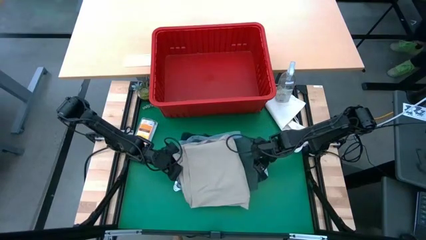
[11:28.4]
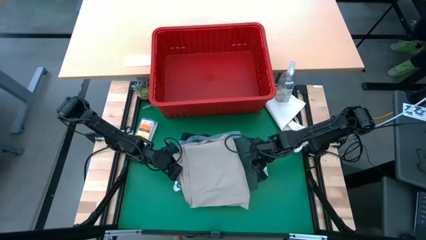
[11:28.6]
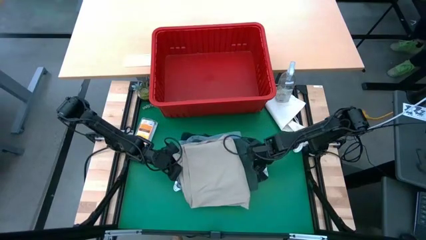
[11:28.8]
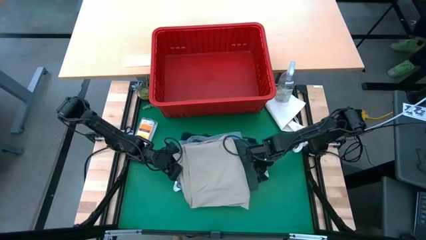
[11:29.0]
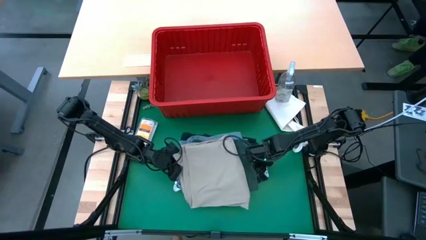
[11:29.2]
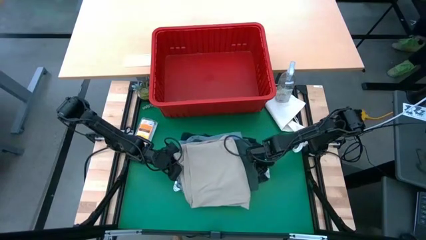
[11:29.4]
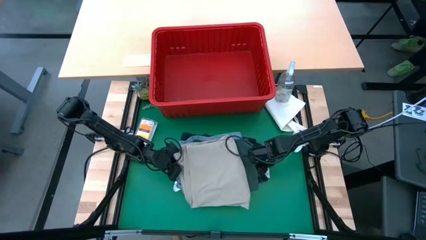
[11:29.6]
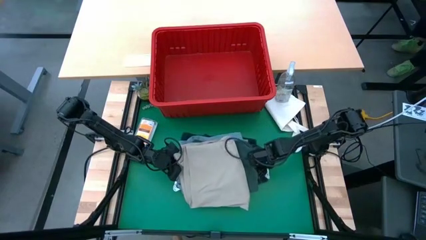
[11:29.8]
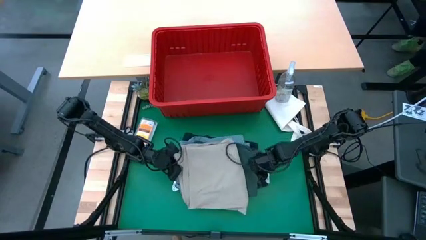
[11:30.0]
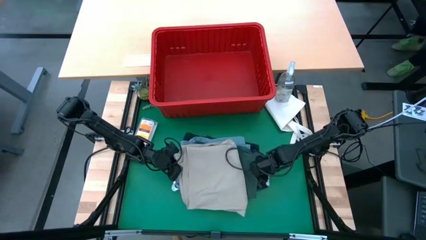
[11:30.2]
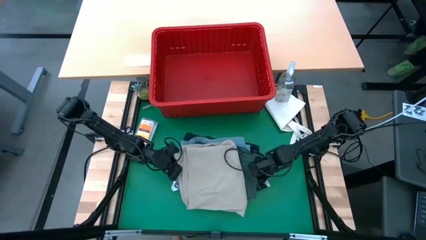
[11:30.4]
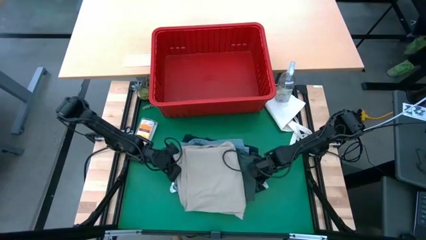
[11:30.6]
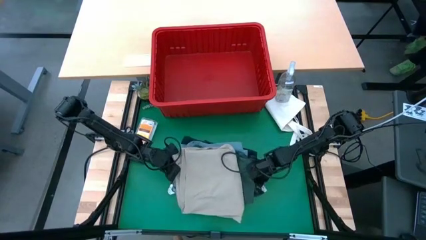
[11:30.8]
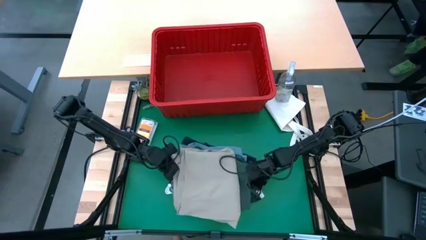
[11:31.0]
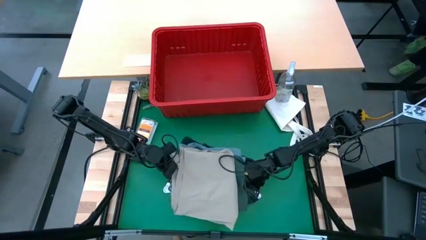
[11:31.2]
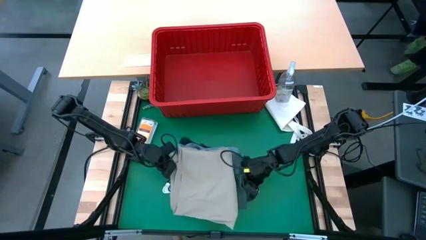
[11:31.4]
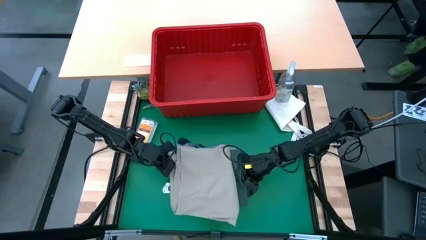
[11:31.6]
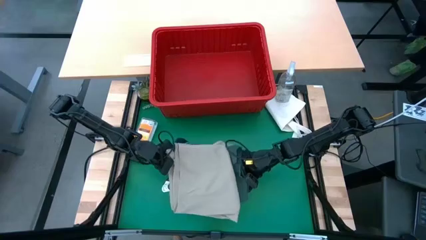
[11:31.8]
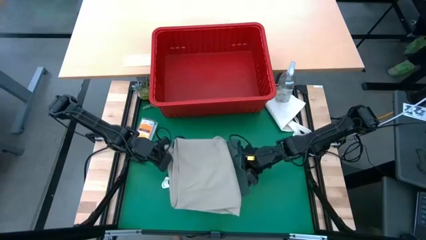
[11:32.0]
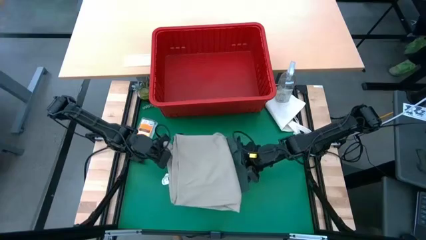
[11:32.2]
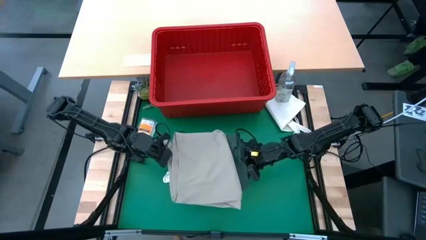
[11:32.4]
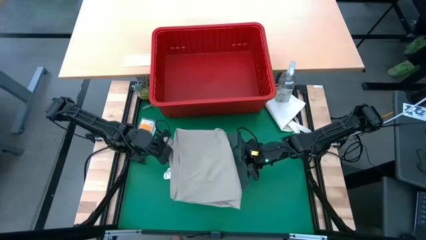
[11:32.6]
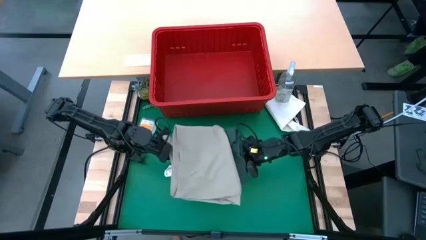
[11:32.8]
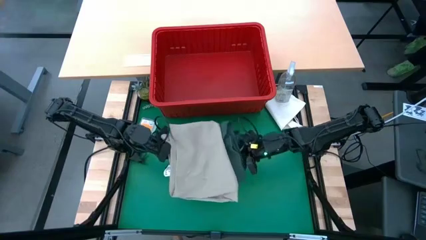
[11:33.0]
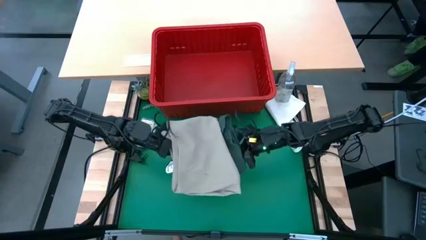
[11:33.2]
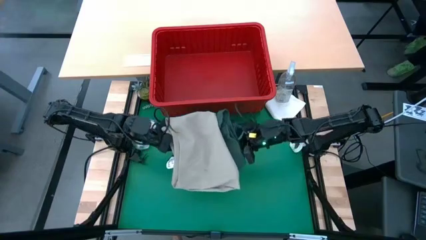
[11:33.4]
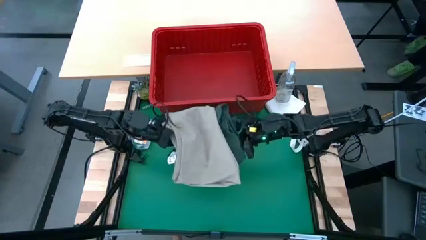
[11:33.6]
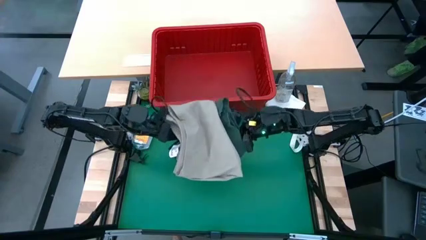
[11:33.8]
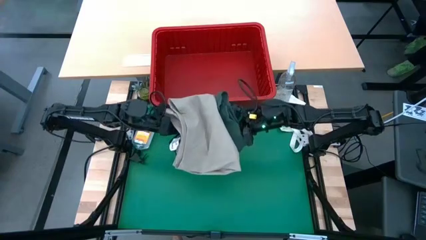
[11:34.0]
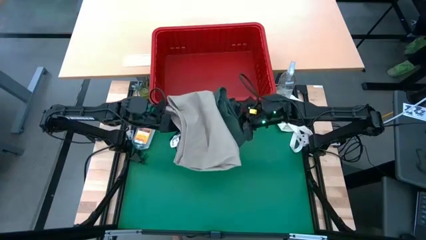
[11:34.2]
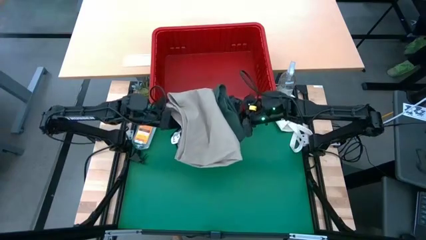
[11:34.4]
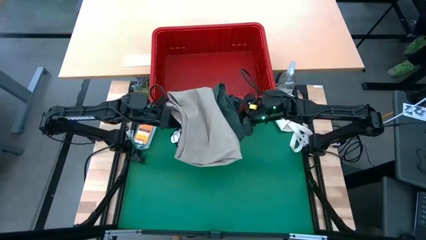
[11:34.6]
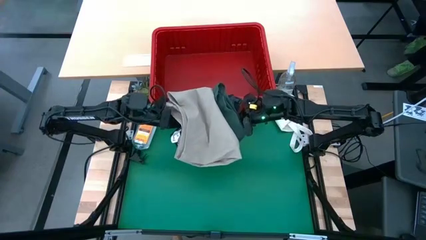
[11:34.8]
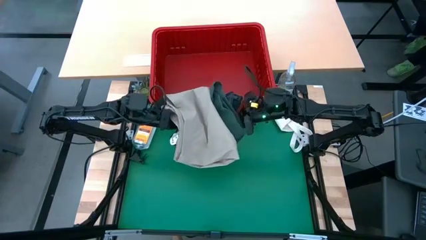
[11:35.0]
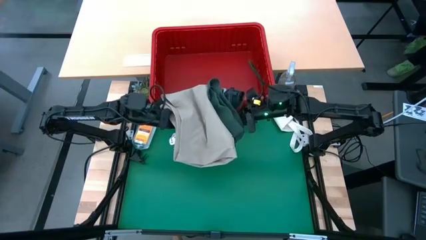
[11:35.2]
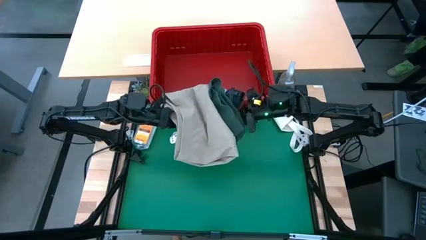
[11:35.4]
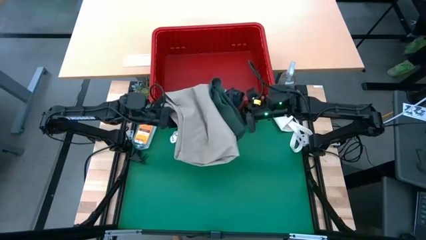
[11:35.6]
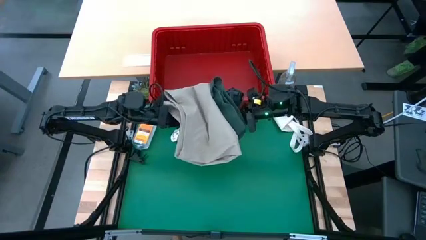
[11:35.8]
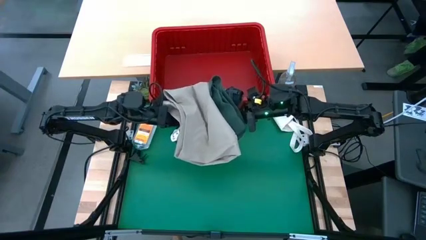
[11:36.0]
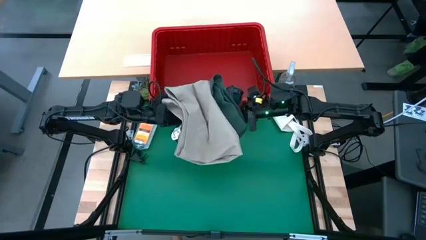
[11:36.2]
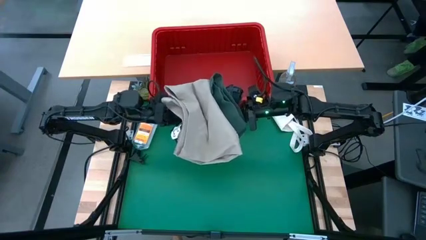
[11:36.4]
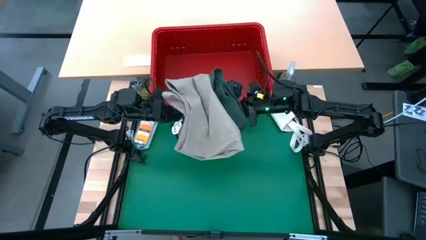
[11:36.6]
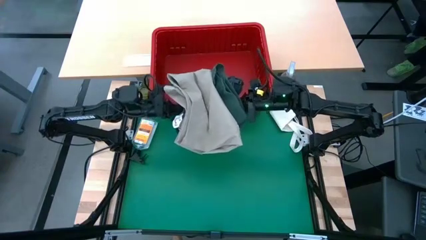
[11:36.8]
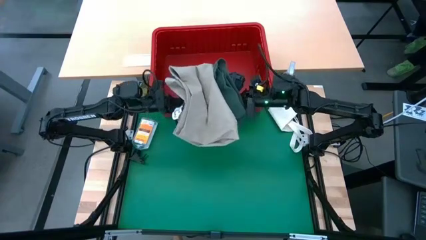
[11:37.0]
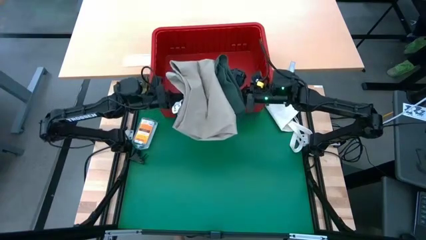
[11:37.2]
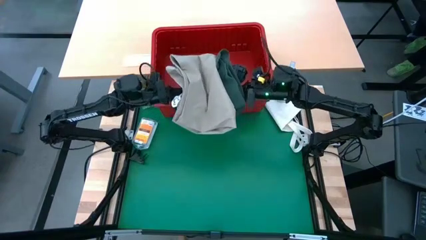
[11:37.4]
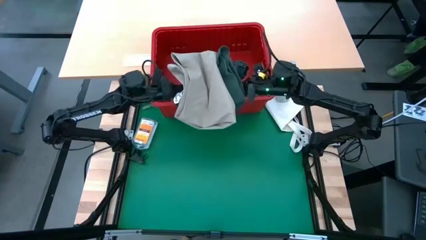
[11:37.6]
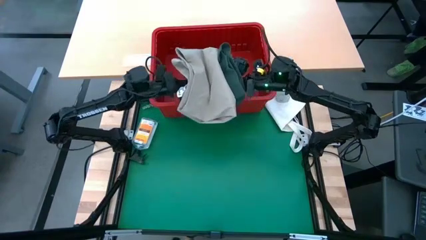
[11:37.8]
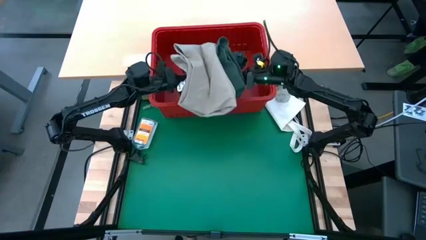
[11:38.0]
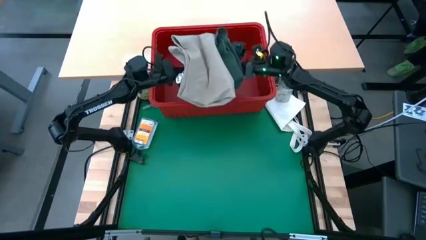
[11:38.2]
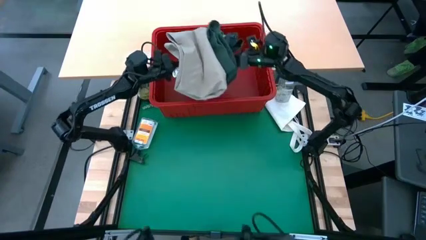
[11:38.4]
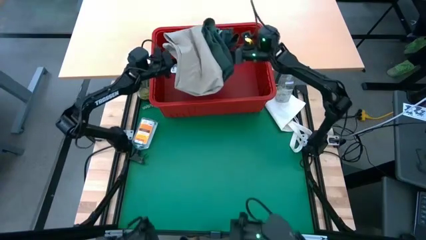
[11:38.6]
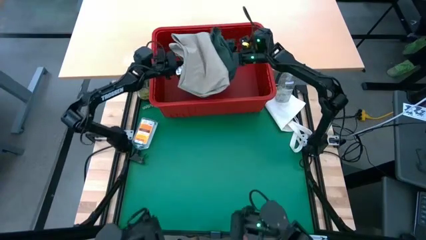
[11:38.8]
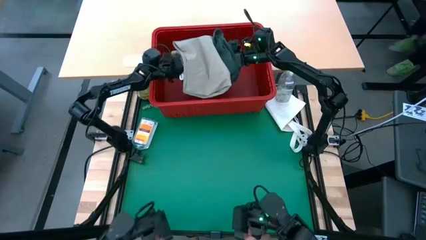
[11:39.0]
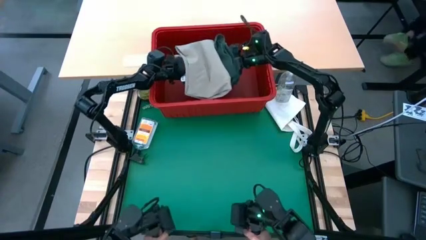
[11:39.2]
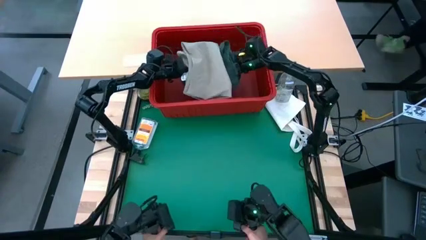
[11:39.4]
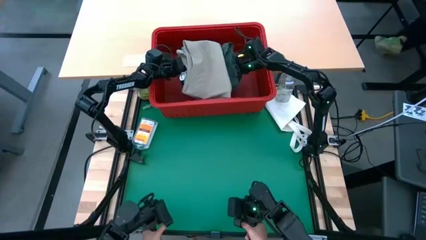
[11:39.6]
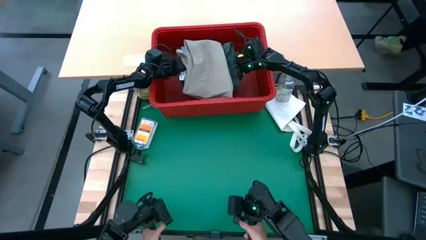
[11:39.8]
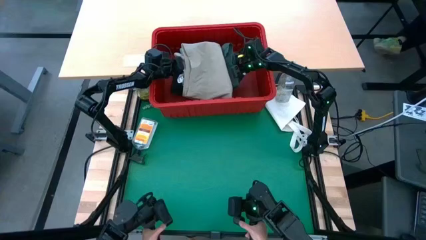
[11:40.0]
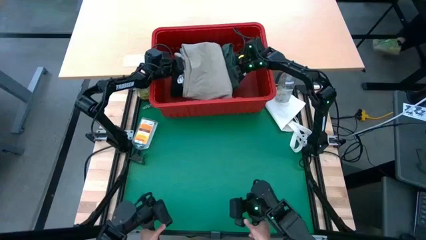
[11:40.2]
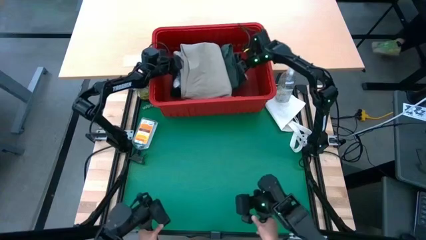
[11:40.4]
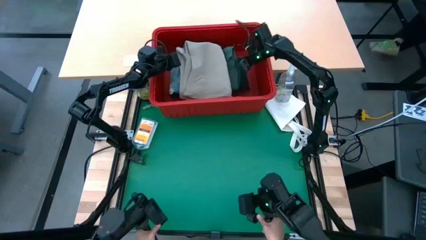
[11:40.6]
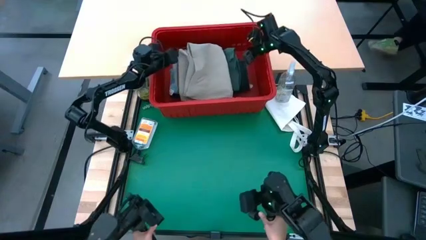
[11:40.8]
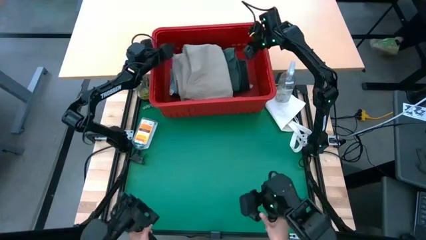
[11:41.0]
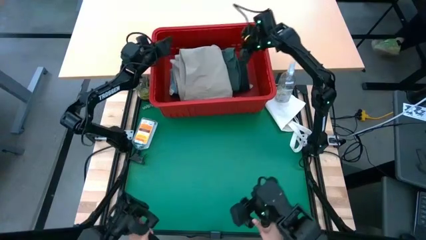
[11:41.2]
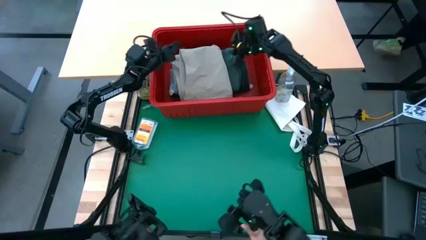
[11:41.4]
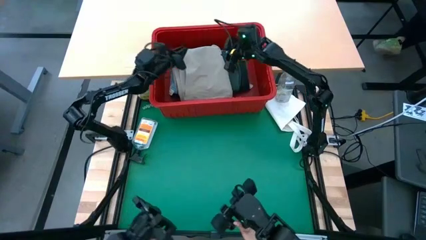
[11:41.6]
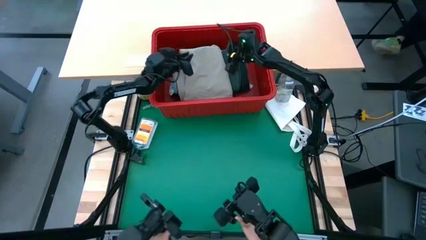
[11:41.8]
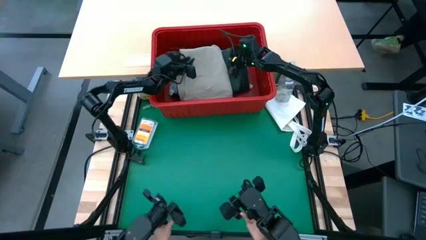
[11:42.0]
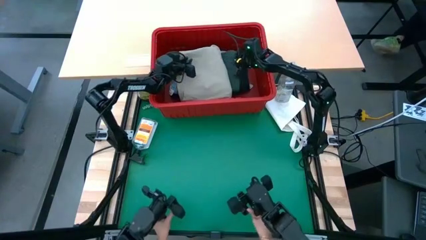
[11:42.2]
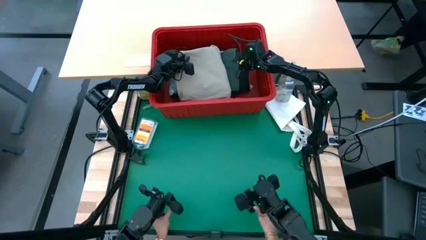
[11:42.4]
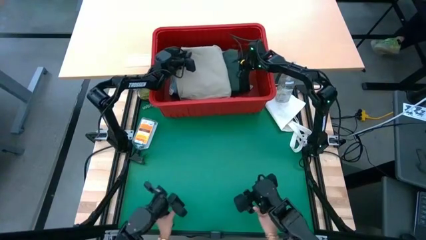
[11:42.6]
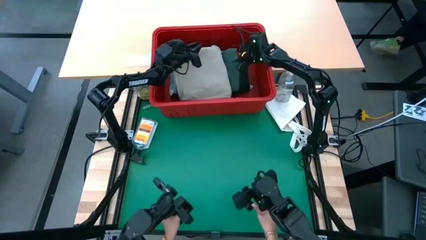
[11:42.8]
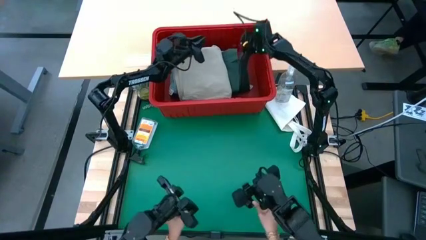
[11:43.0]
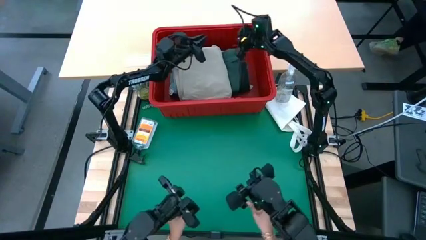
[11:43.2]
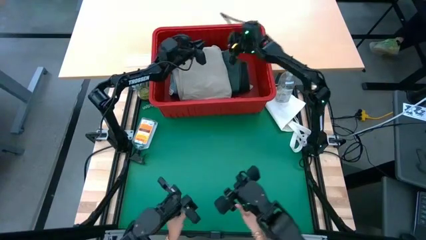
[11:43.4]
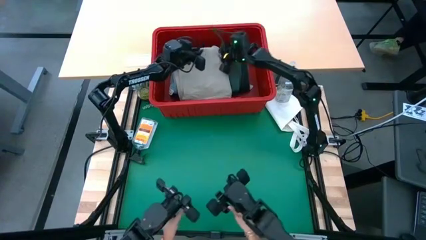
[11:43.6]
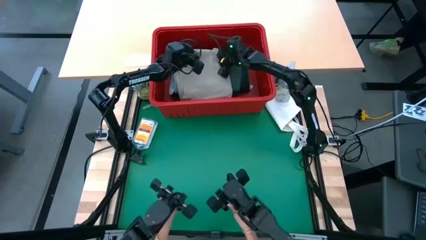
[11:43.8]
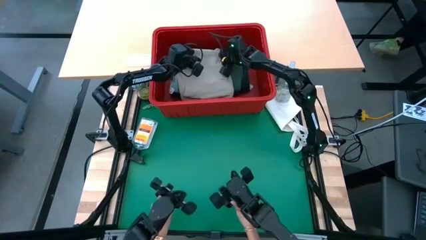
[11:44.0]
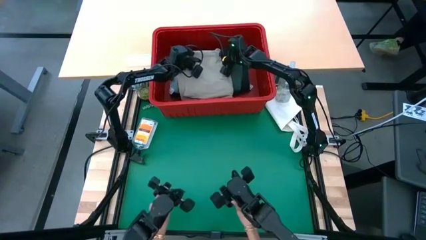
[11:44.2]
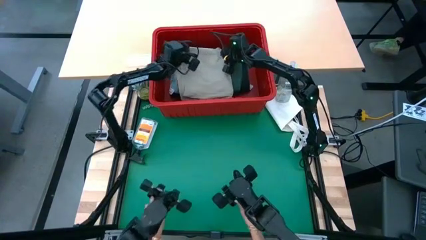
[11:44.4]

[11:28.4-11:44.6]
Task: Fold laundry
Put the stack of colored folded clothes into the red laundry bin
